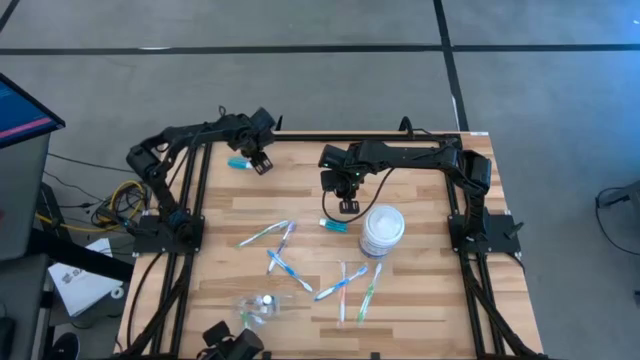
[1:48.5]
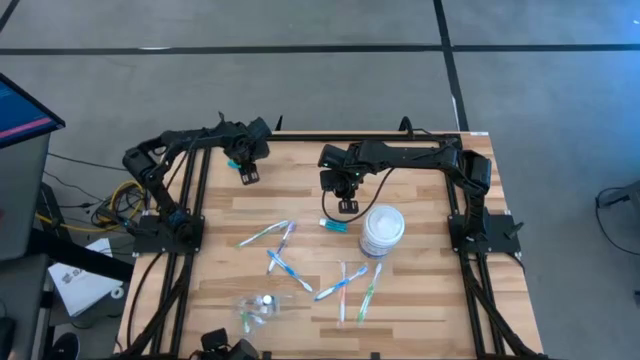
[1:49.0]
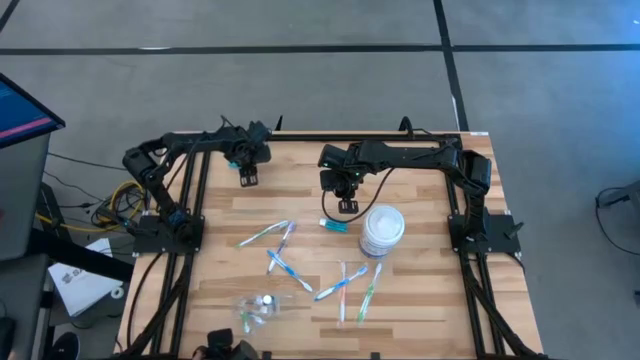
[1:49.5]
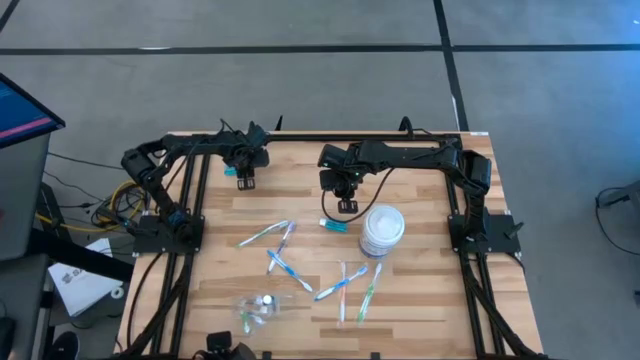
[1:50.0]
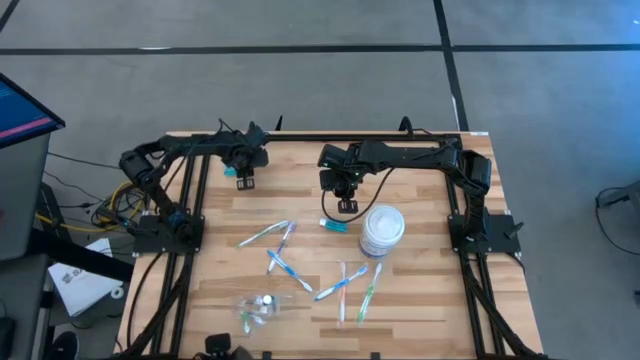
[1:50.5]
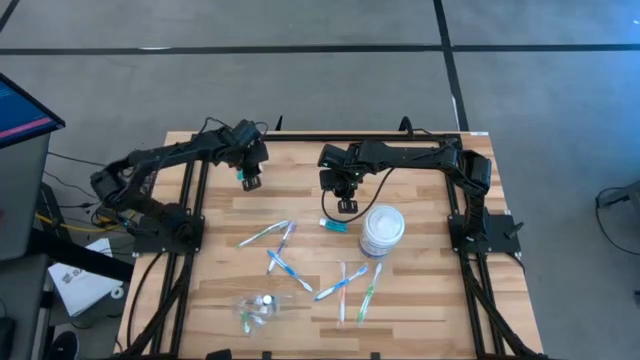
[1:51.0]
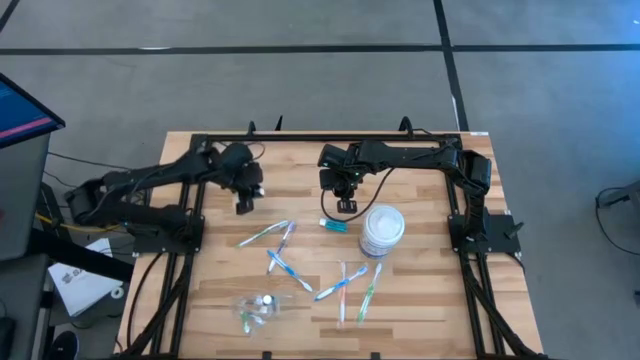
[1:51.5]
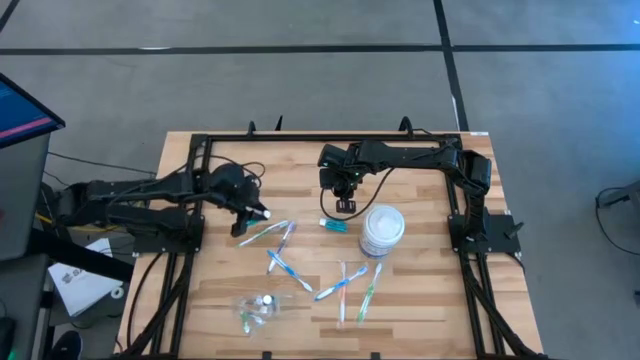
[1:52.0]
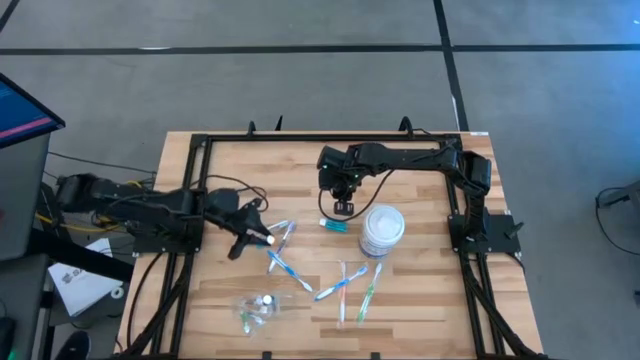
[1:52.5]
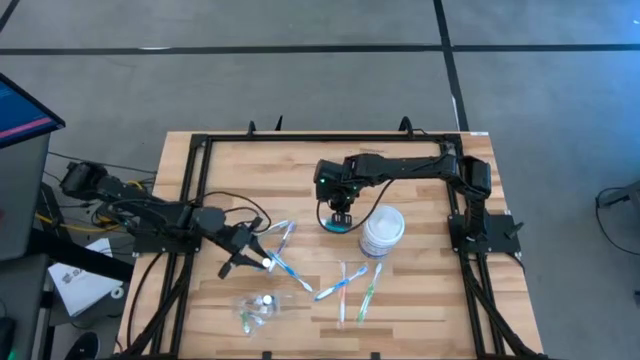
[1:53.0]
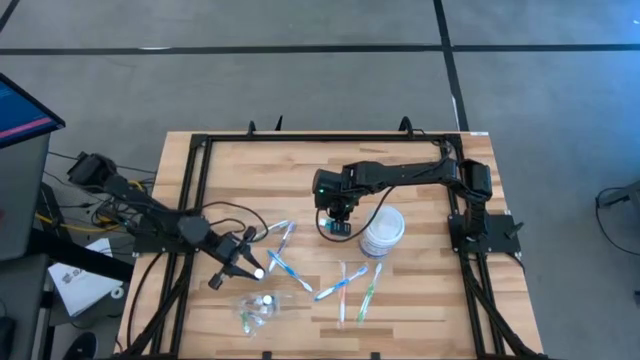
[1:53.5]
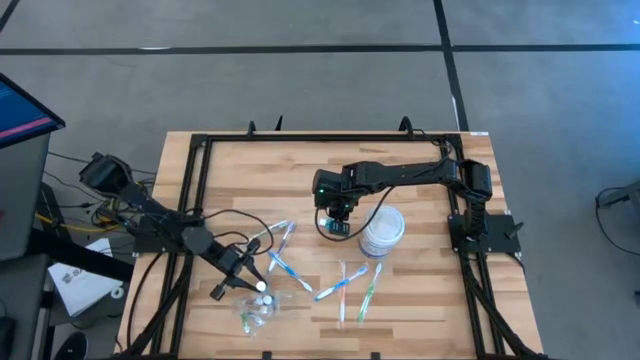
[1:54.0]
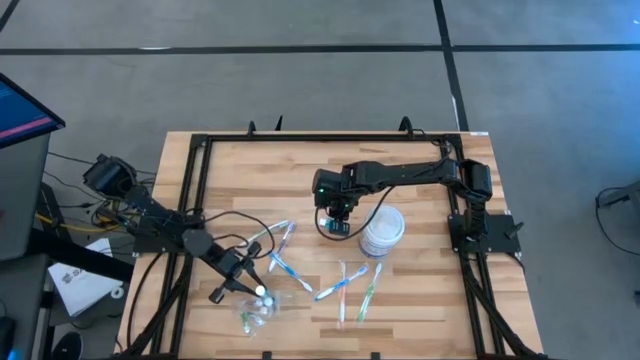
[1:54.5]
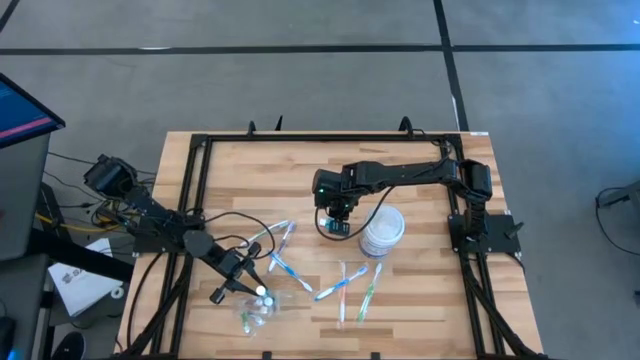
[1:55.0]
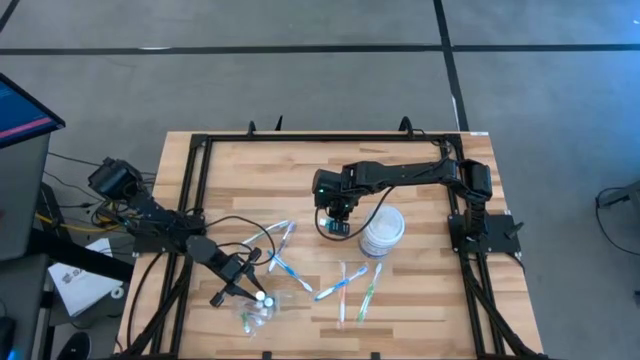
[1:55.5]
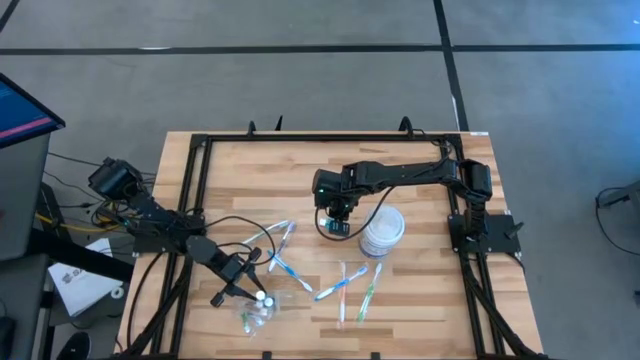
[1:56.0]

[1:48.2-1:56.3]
Task: Pick & Place toothbrushing station
Put the top blue mouthwash into the transparent organizer

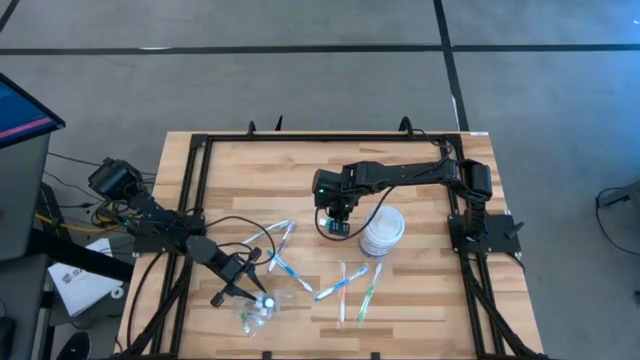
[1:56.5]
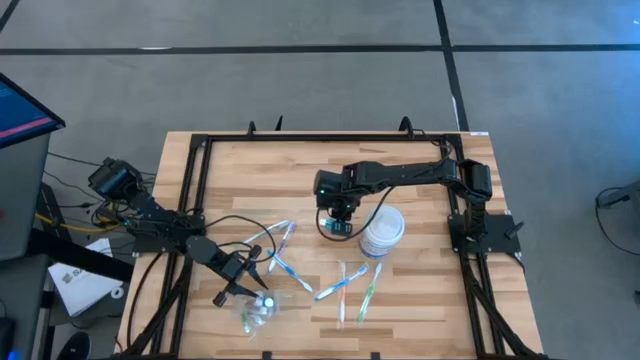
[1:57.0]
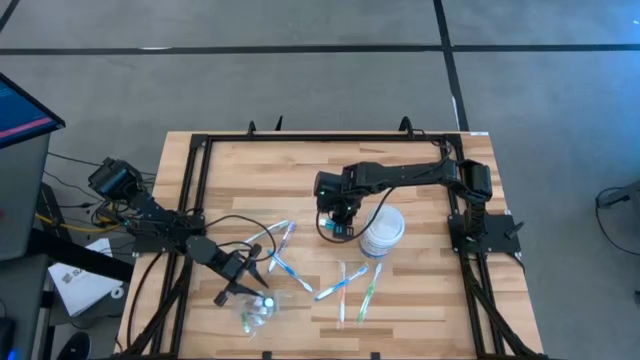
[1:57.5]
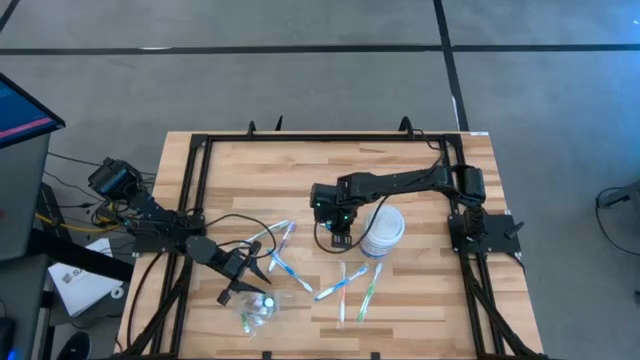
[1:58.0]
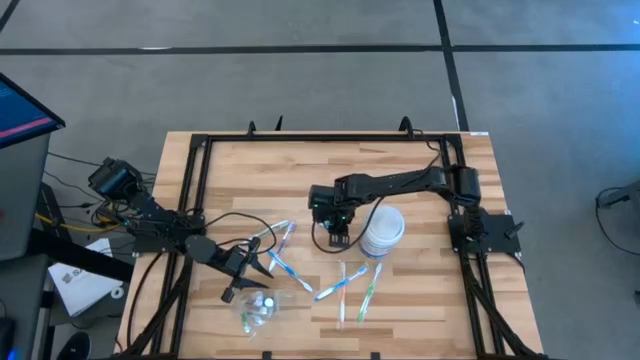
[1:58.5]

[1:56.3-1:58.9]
Put the blue mouthwash into the transparent organizer

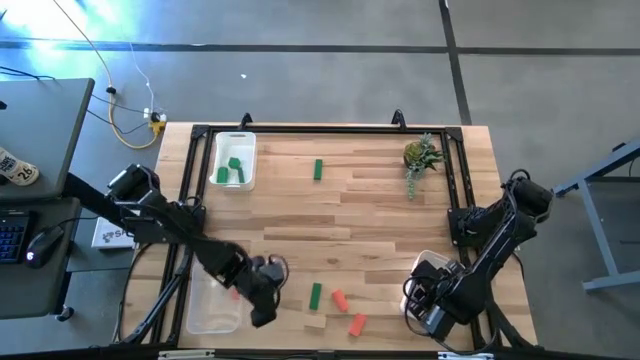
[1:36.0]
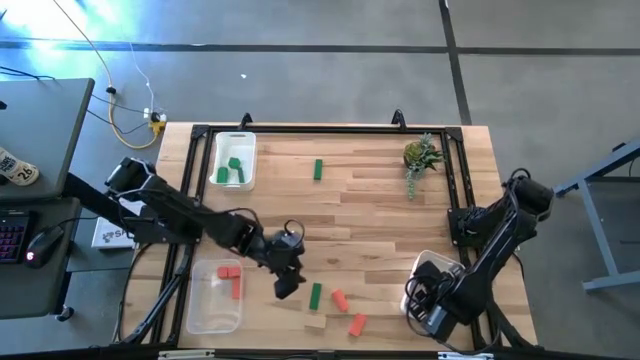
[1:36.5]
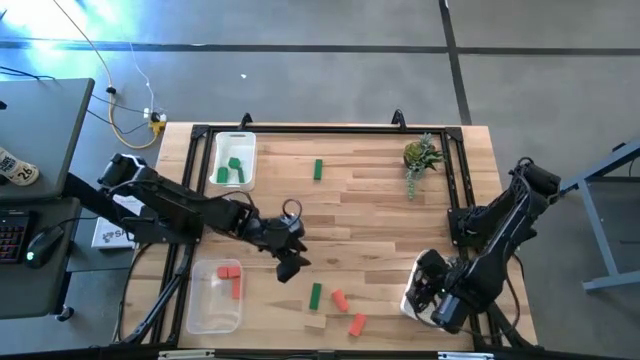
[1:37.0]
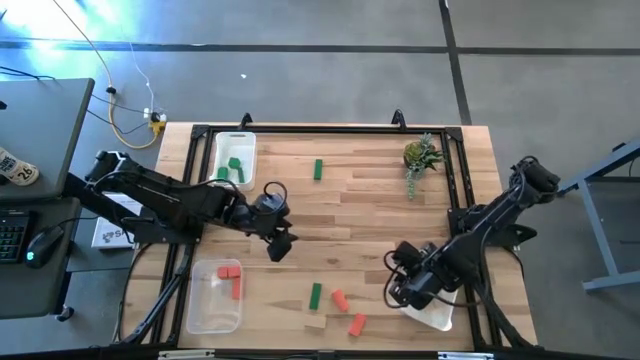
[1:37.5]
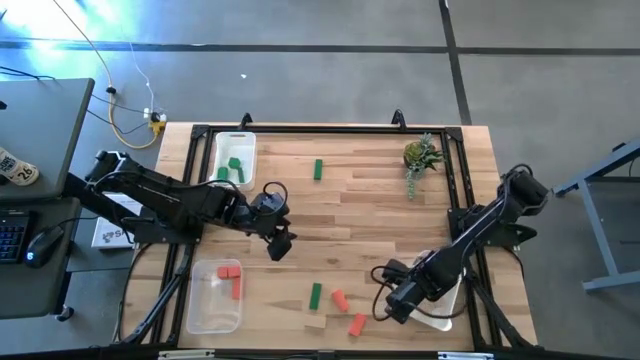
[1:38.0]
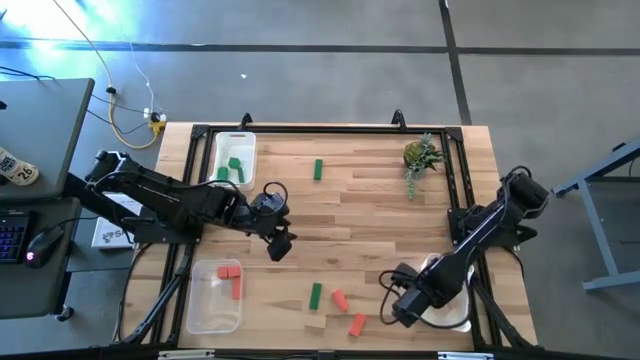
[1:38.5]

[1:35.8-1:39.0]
Task: Sort & place blocks by color
Adjust the white bin on the table

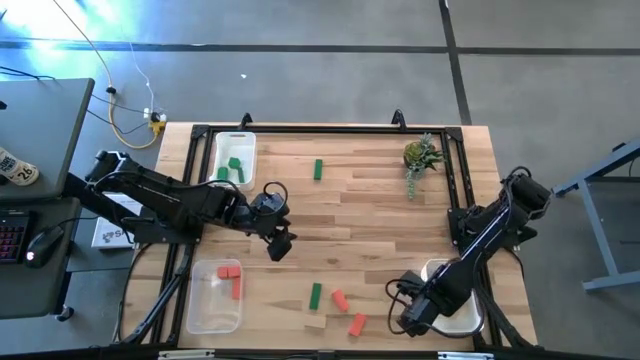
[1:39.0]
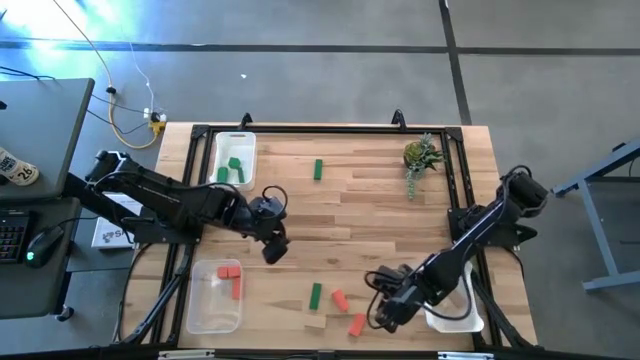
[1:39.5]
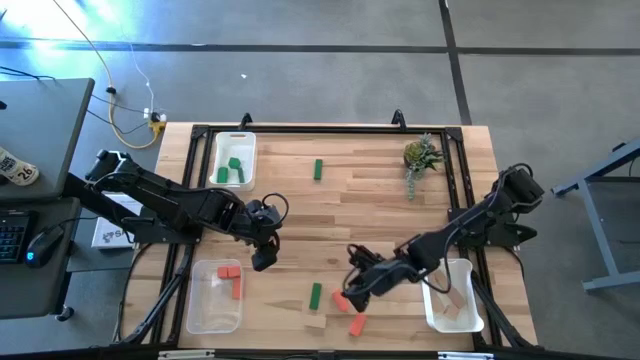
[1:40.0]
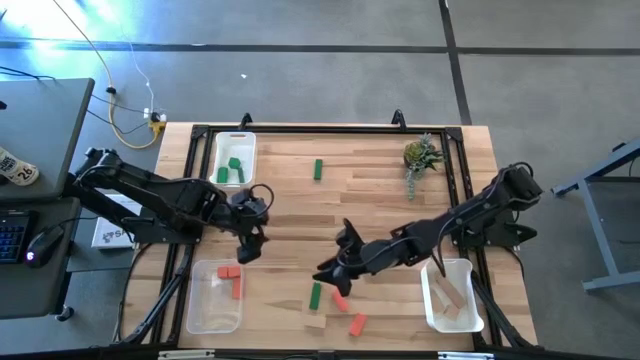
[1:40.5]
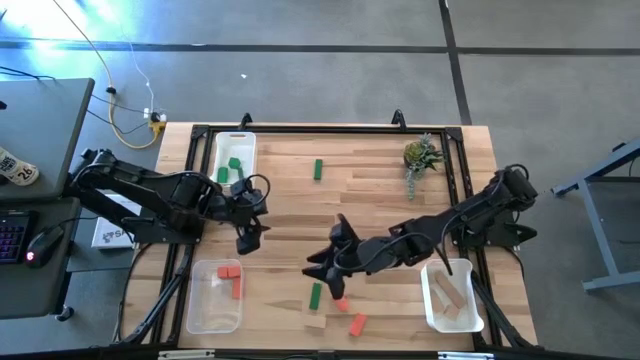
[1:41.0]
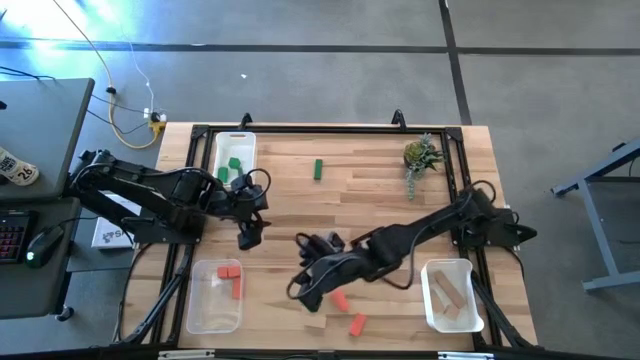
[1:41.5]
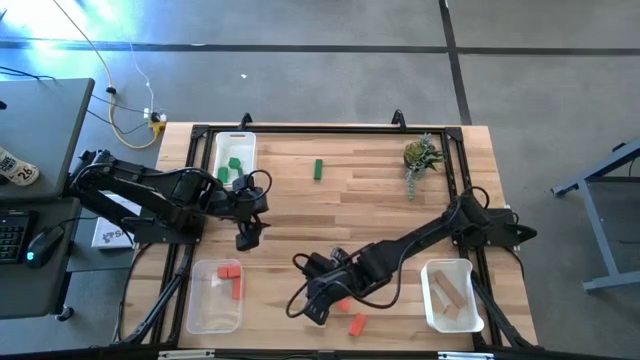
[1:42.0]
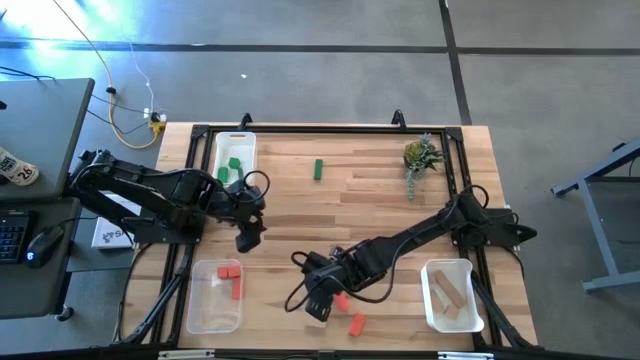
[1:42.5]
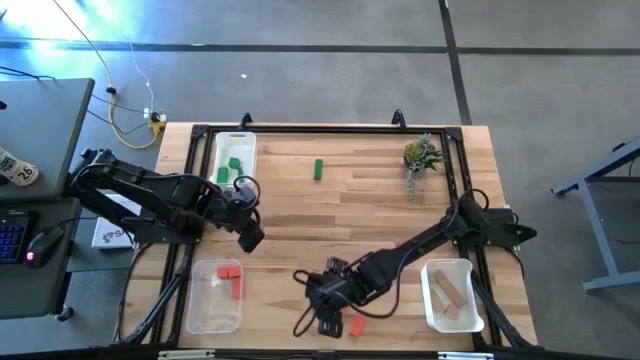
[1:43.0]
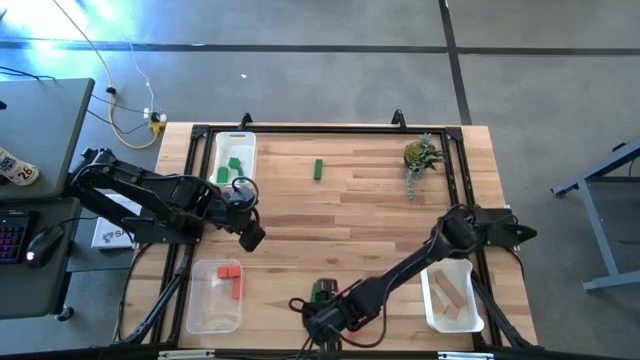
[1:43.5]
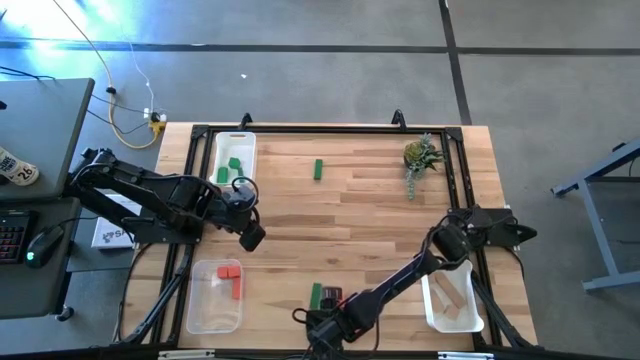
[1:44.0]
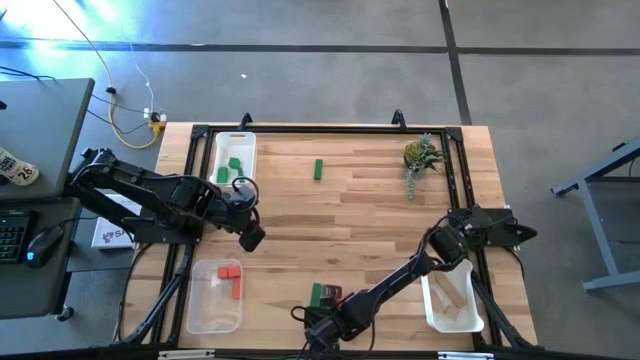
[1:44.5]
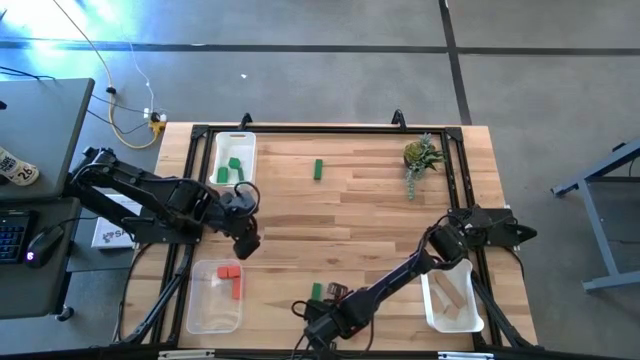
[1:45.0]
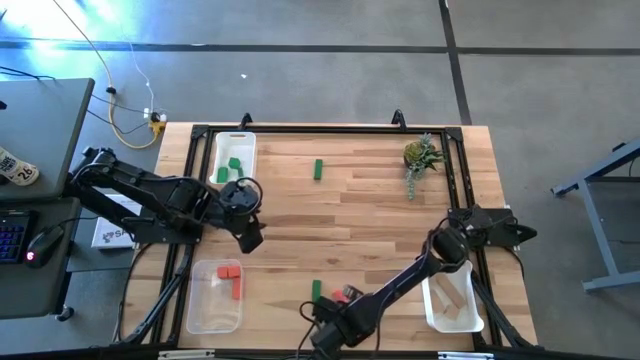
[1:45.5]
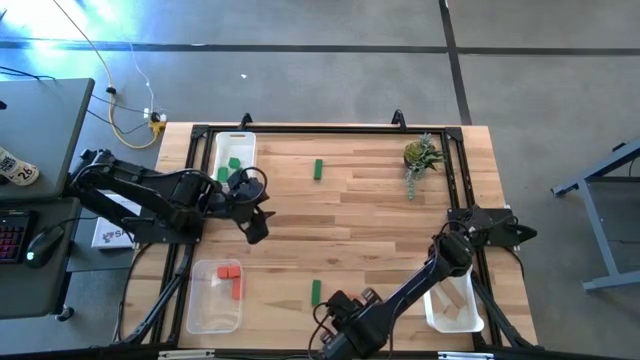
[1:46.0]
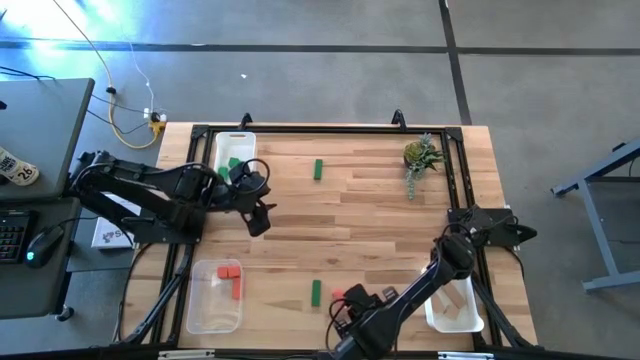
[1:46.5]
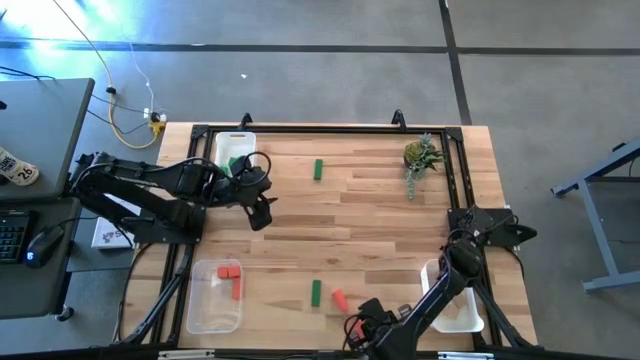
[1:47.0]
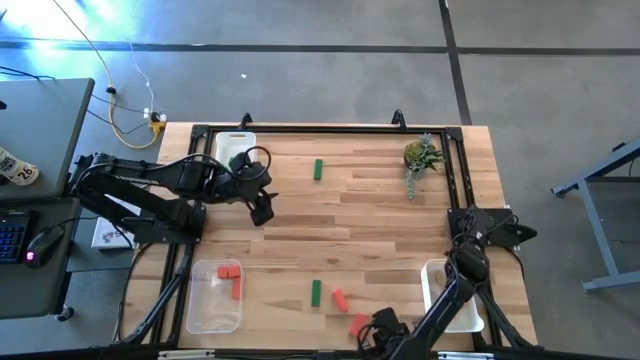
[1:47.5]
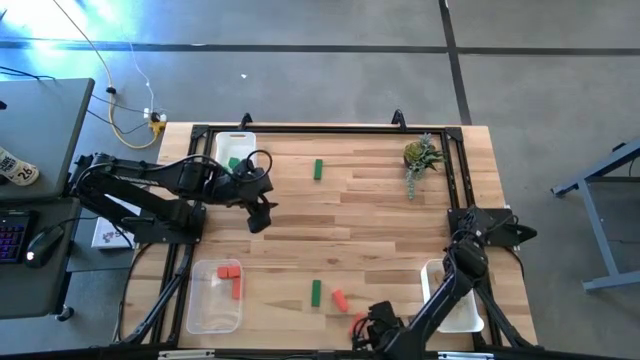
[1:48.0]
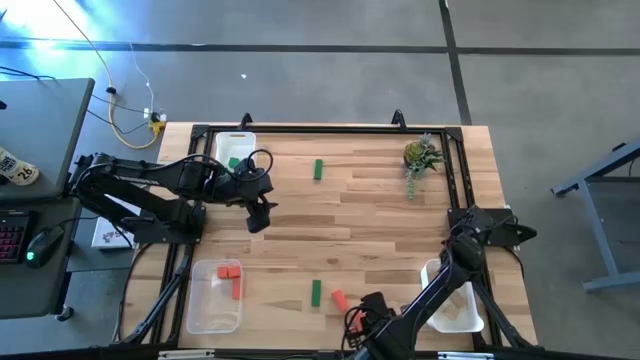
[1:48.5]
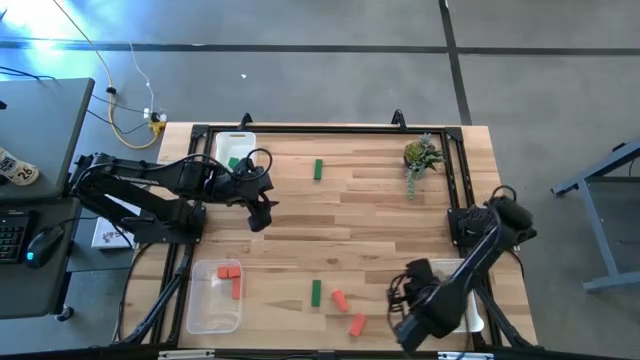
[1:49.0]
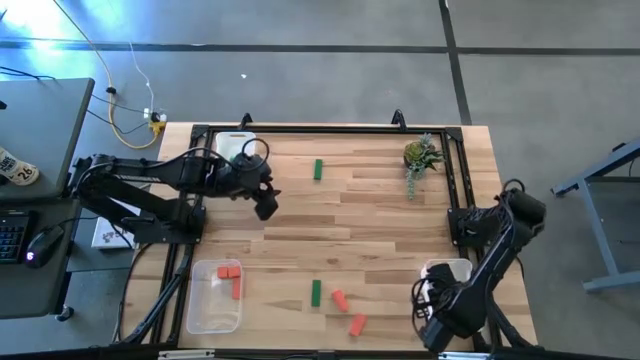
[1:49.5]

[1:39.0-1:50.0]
Put the brown block into the bottom white bin
